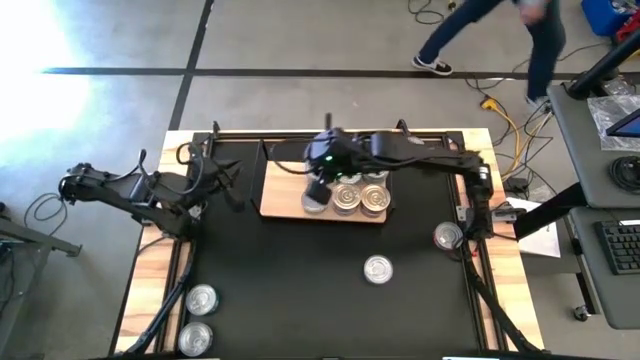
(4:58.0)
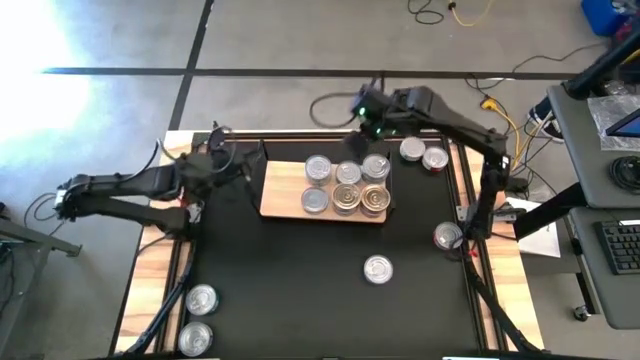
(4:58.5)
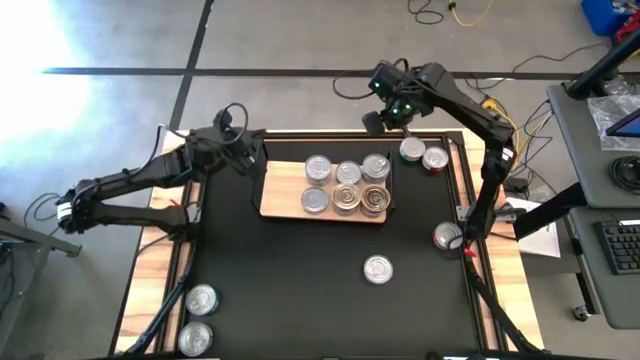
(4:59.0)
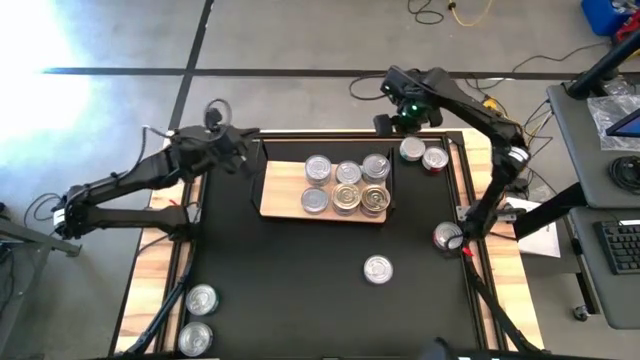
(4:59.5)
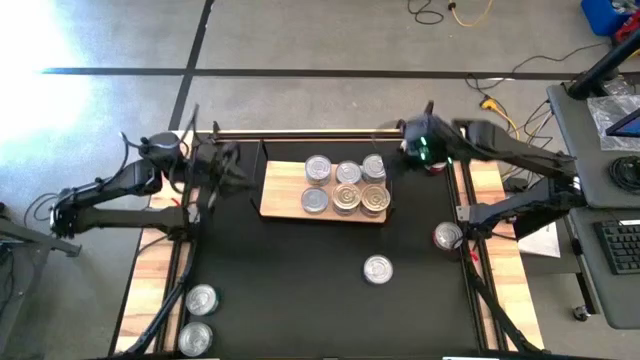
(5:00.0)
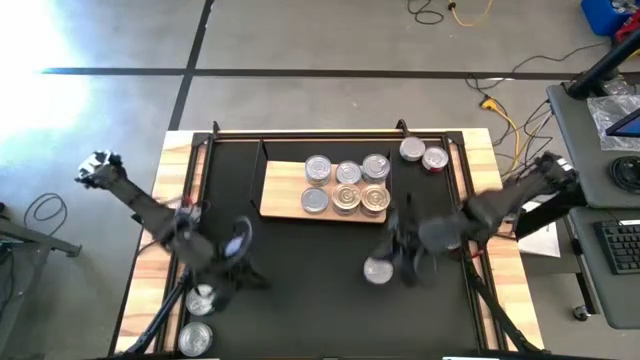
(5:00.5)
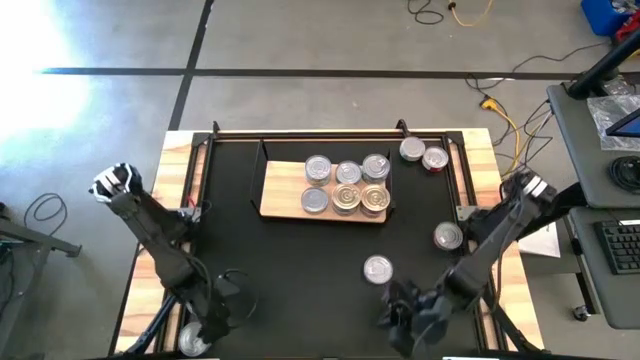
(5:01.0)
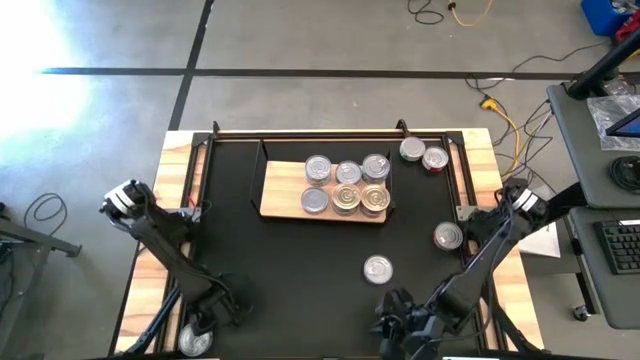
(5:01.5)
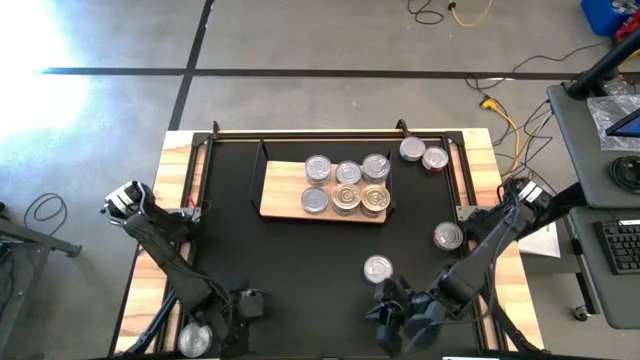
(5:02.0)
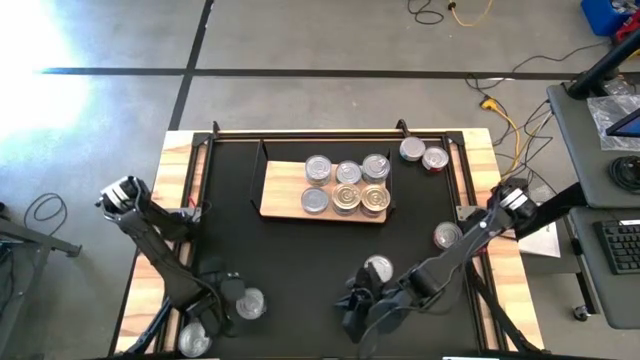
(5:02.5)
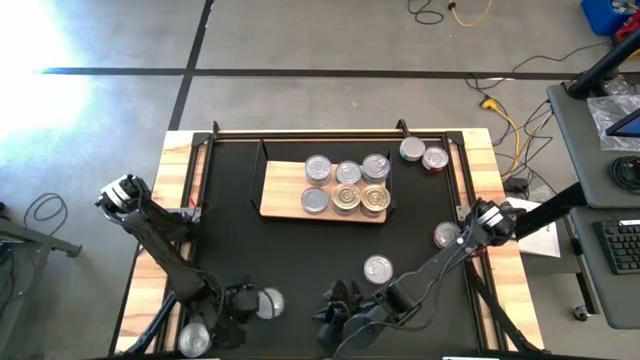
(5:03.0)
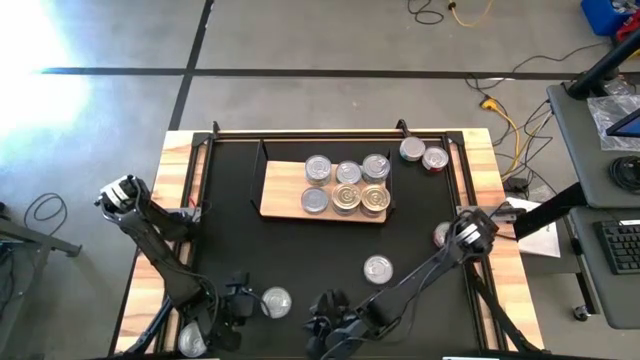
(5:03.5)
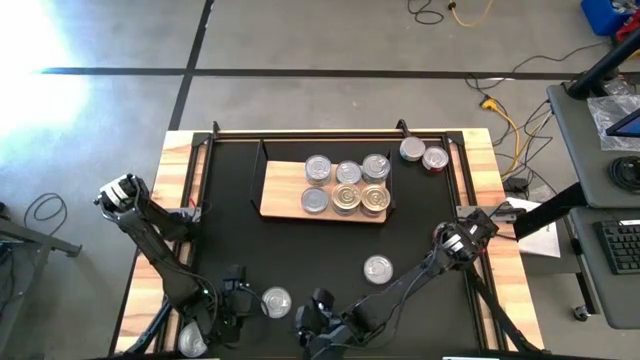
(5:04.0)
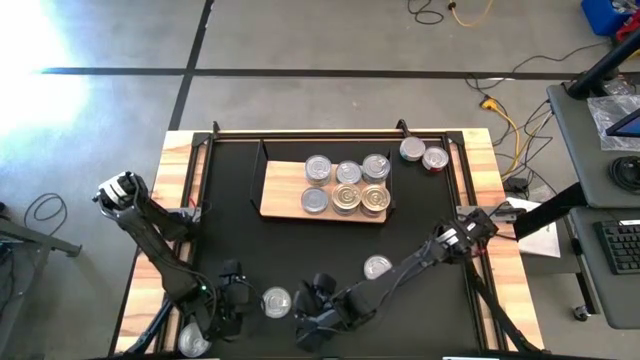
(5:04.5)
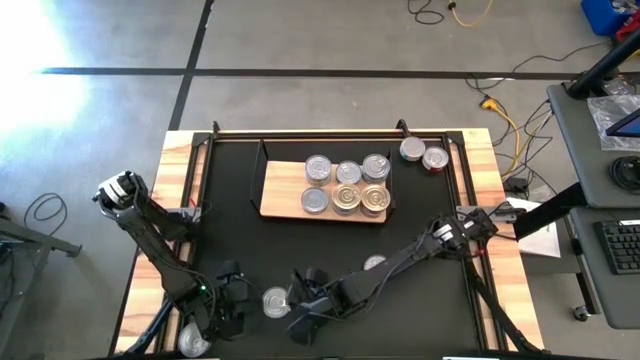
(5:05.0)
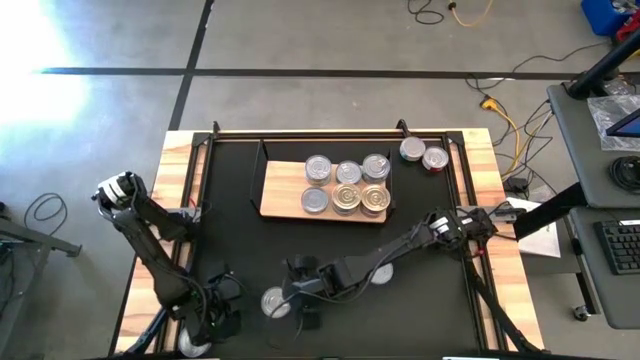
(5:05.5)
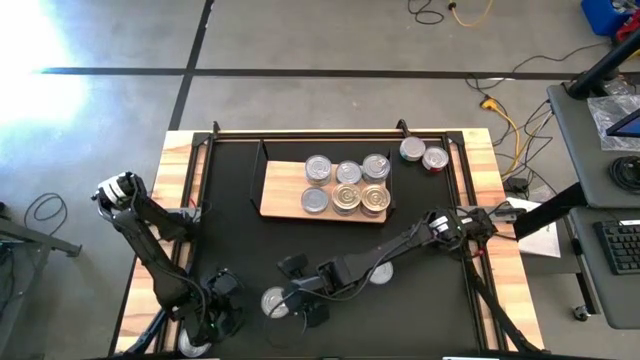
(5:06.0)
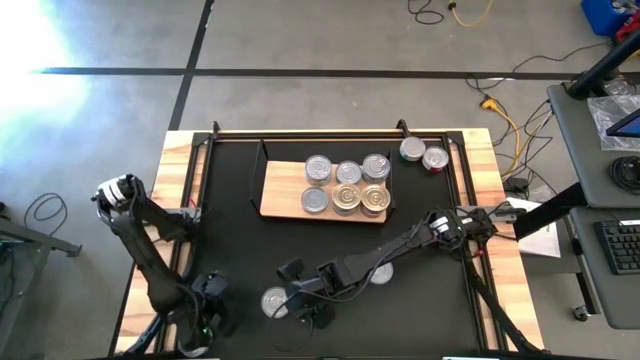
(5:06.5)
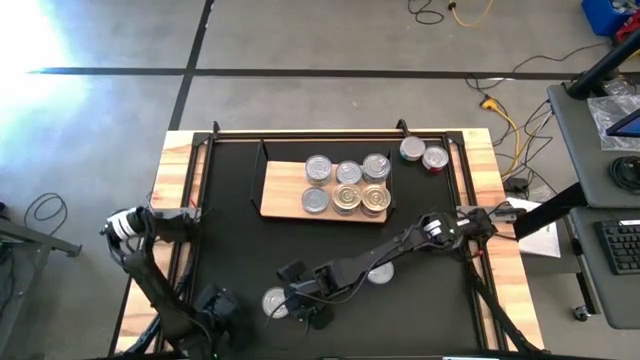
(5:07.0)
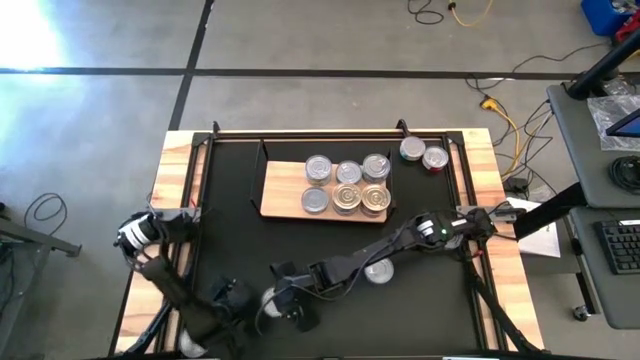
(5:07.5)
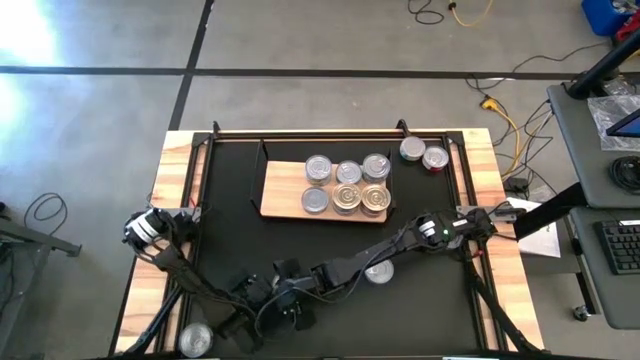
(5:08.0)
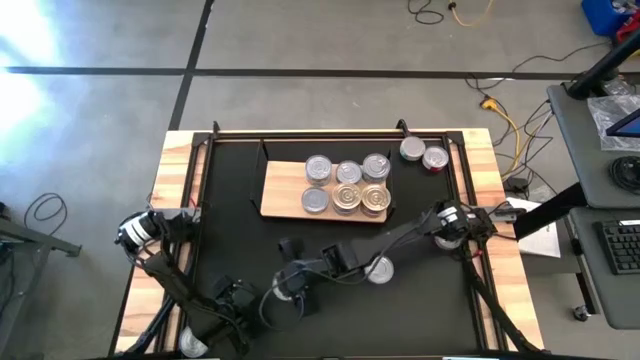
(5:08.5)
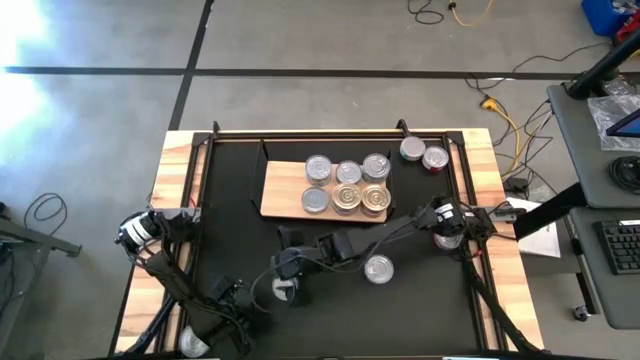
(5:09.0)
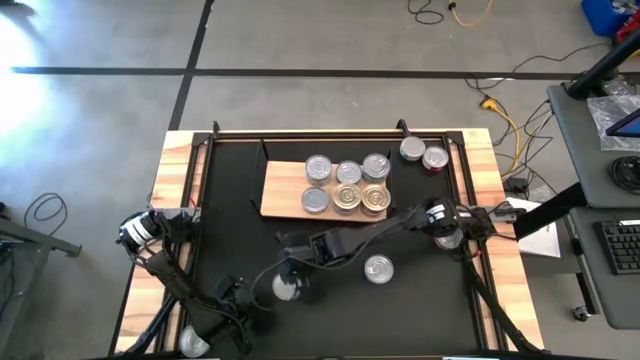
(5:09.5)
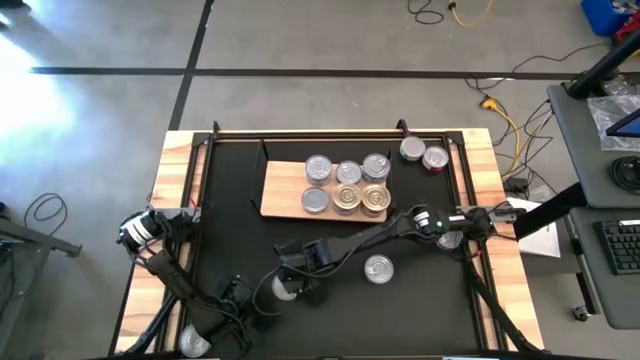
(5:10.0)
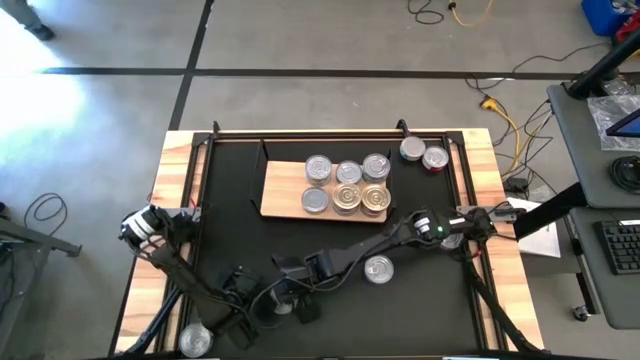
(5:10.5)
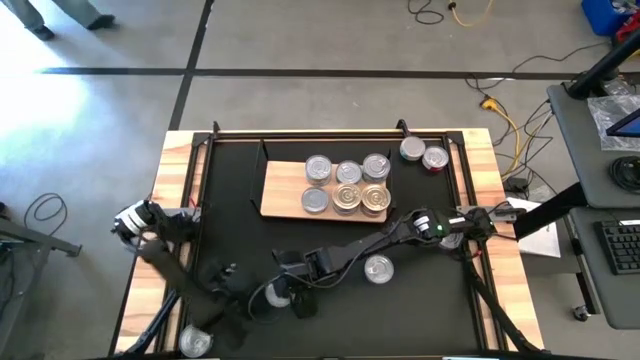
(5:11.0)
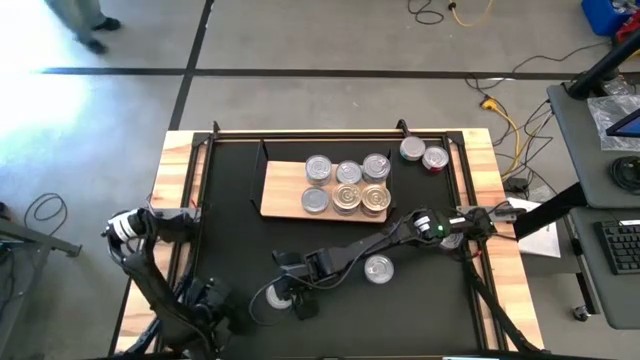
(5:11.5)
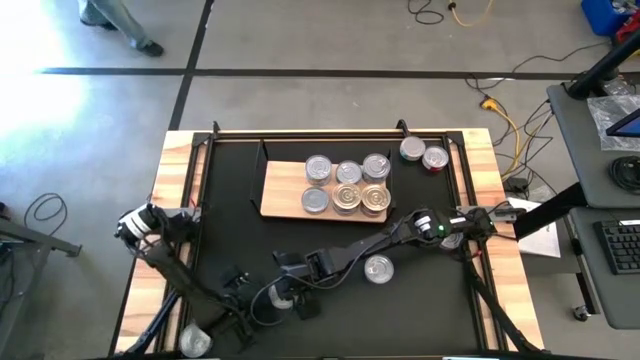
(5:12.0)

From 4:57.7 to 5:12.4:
Task: Stack canned seafood by type on shelf
Stack the bottom left light blue tuna can on the light blue tuna can

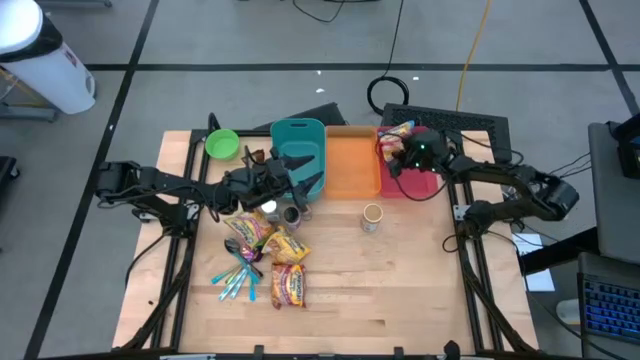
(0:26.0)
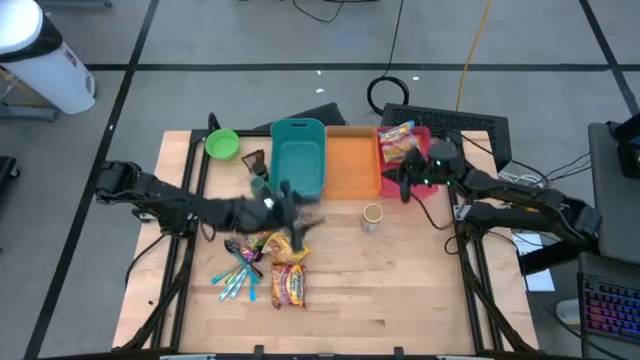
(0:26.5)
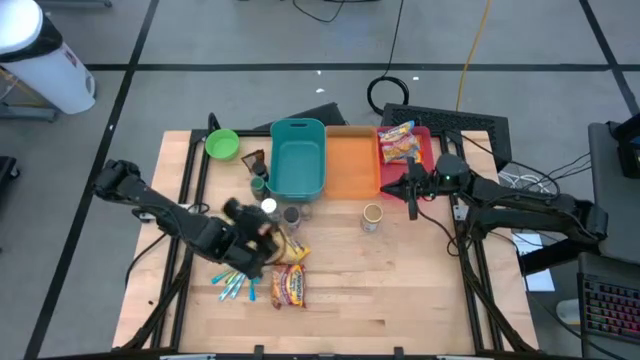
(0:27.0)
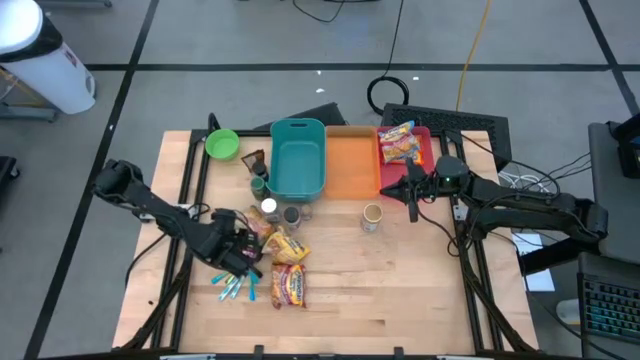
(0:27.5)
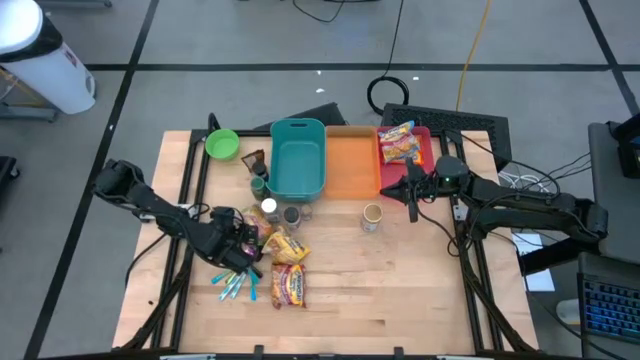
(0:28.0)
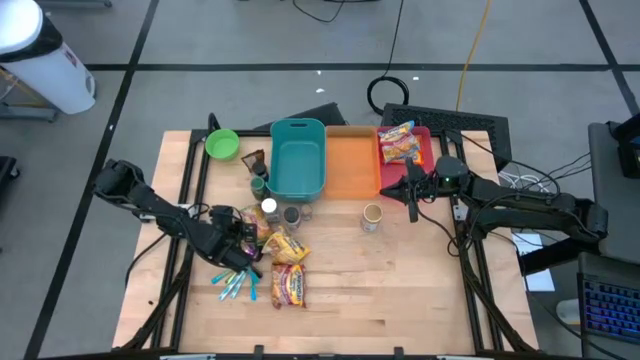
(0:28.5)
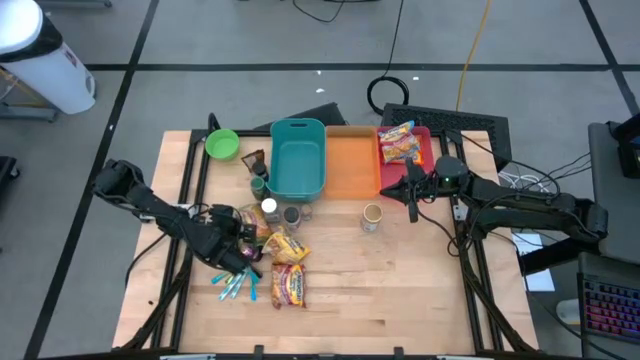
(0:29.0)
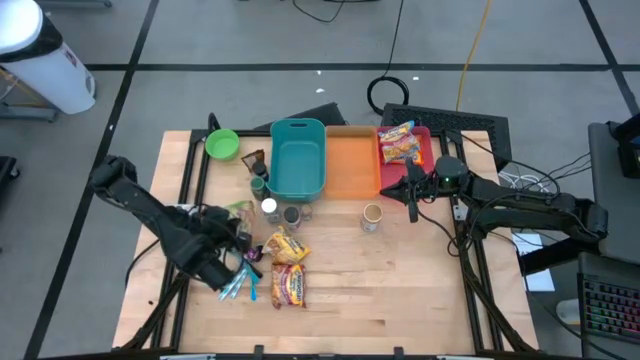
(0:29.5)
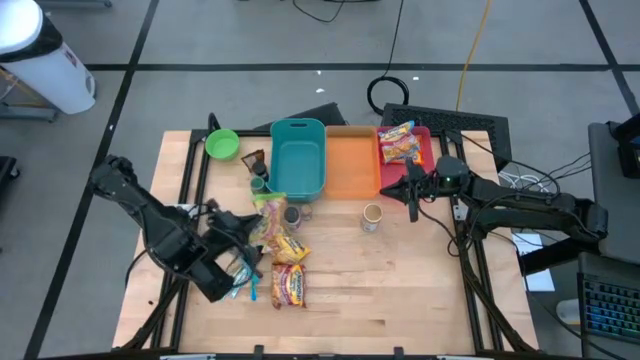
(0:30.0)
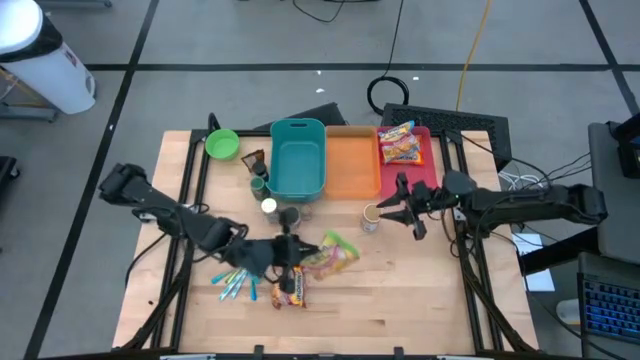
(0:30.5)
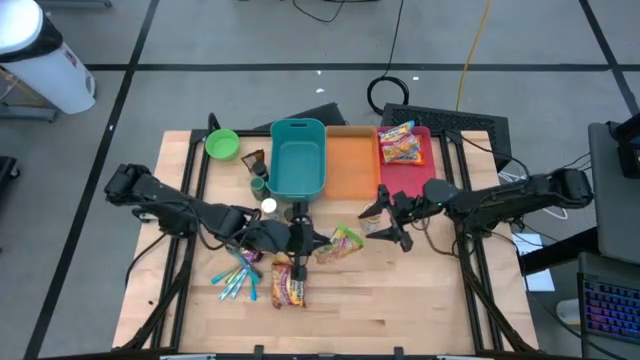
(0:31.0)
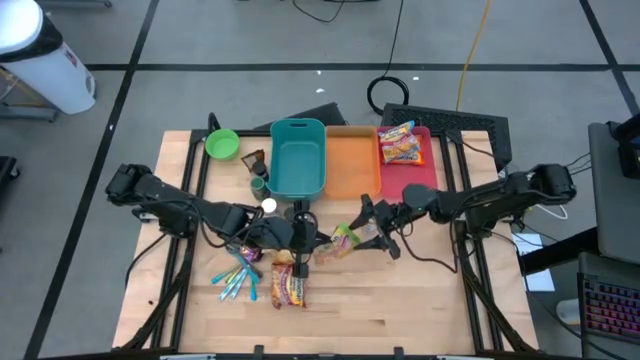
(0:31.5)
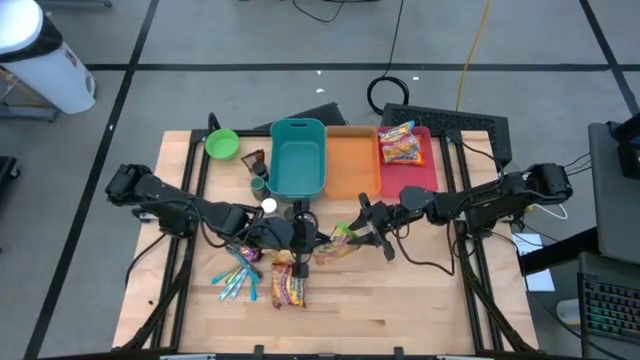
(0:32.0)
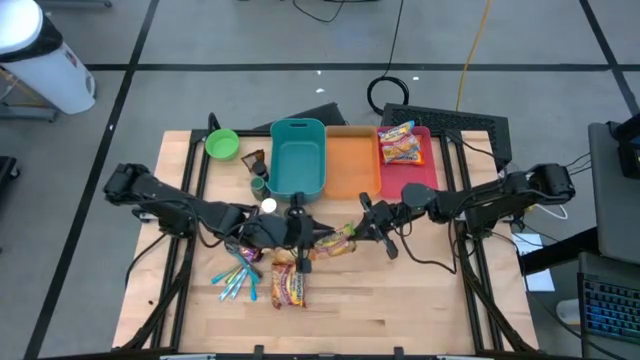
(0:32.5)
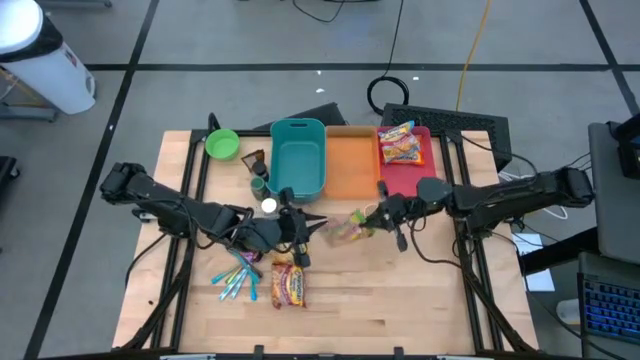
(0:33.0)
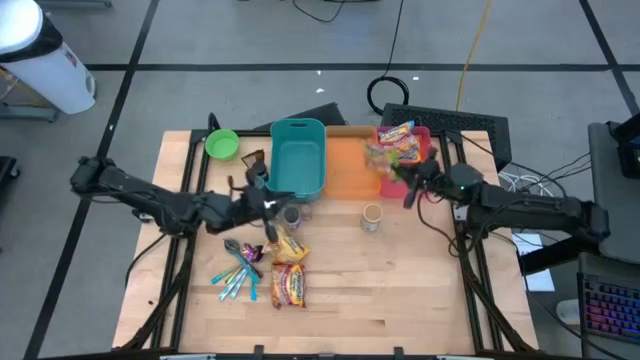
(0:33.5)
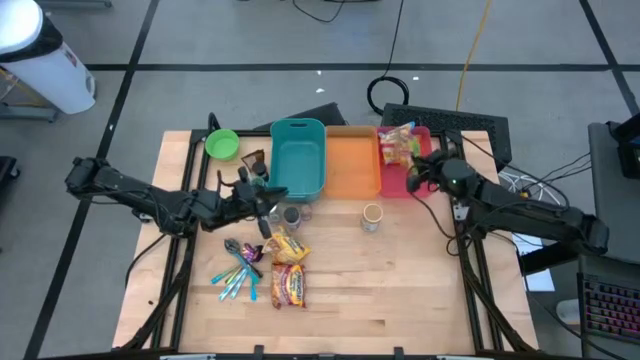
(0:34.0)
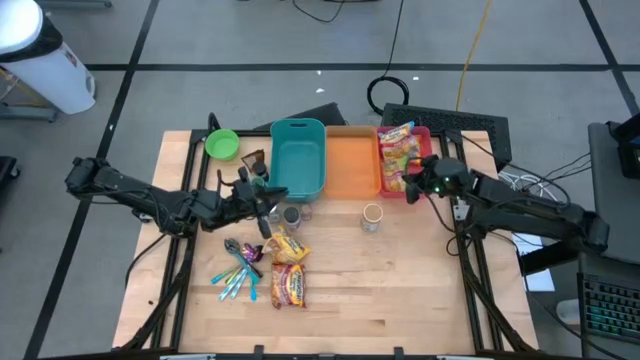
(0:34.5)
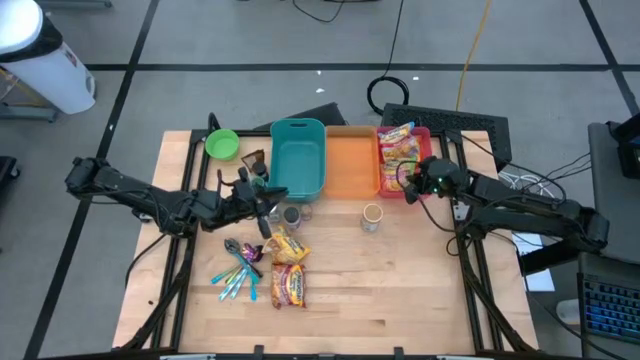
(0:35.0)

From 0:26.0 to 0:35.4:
Task: Pick & Place Food Item
Put the green noodle pack into the red bin
